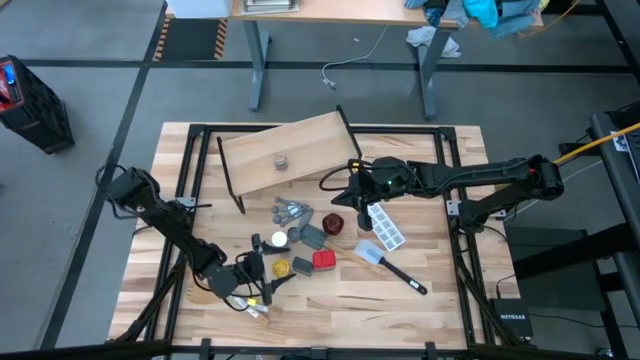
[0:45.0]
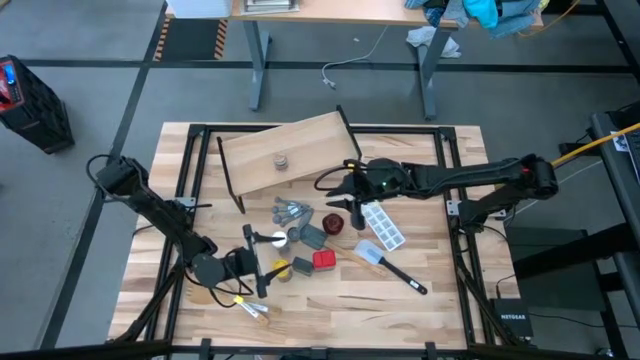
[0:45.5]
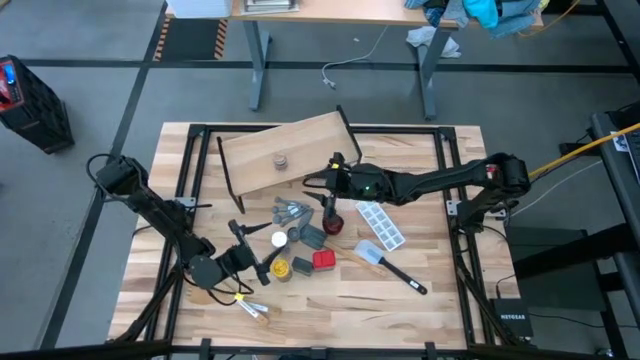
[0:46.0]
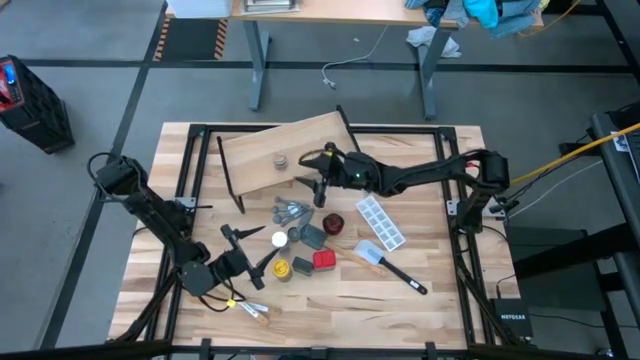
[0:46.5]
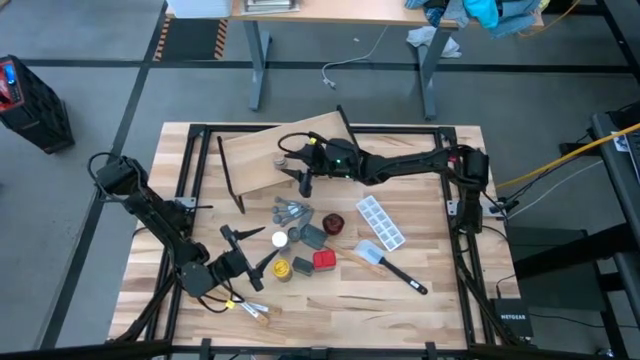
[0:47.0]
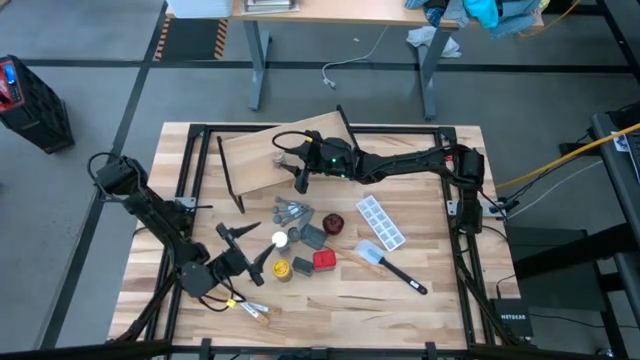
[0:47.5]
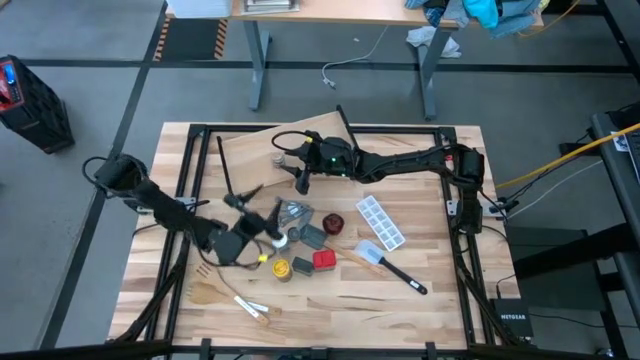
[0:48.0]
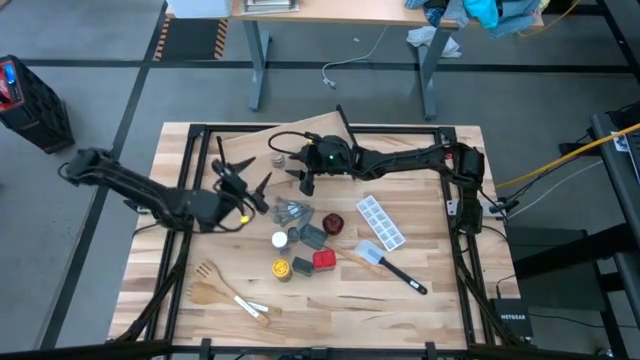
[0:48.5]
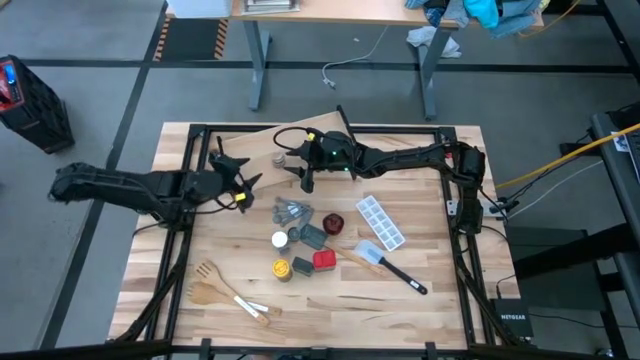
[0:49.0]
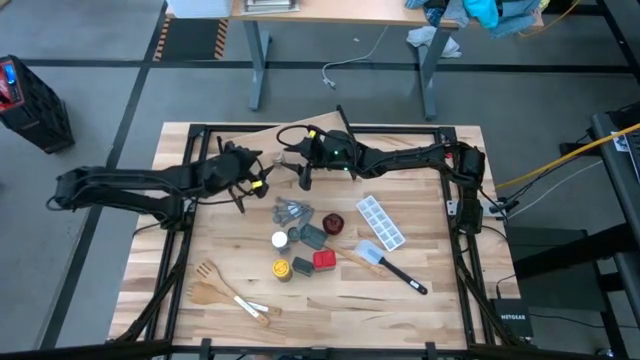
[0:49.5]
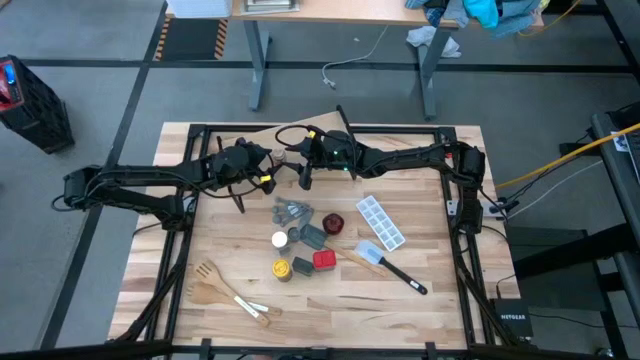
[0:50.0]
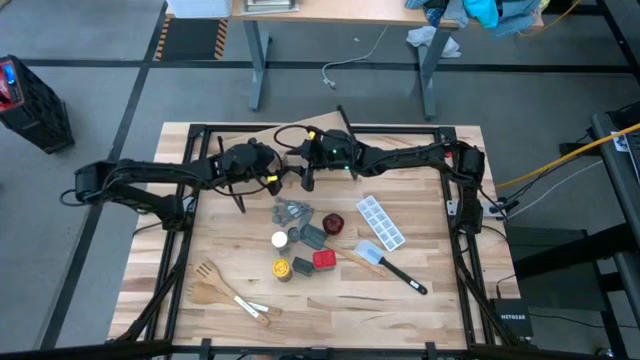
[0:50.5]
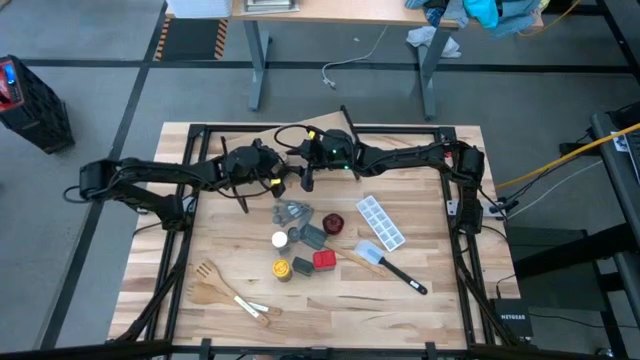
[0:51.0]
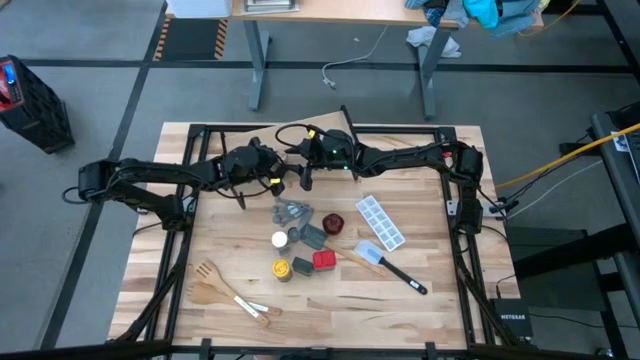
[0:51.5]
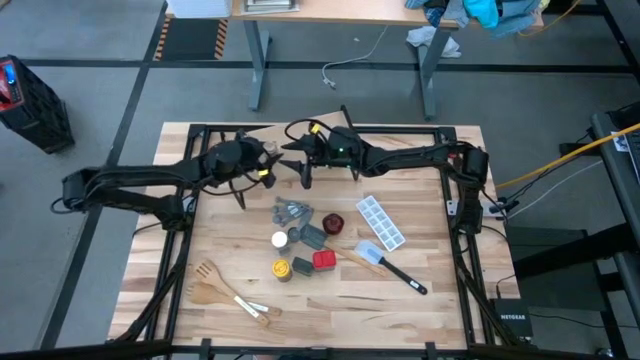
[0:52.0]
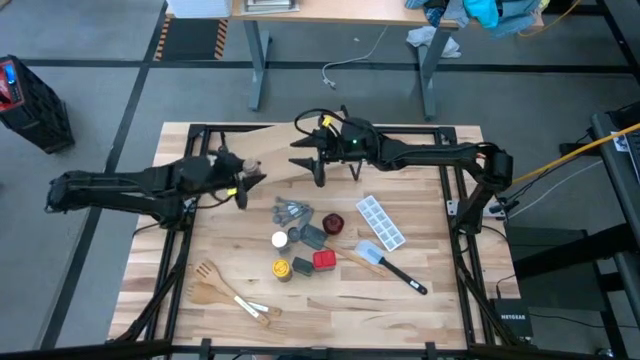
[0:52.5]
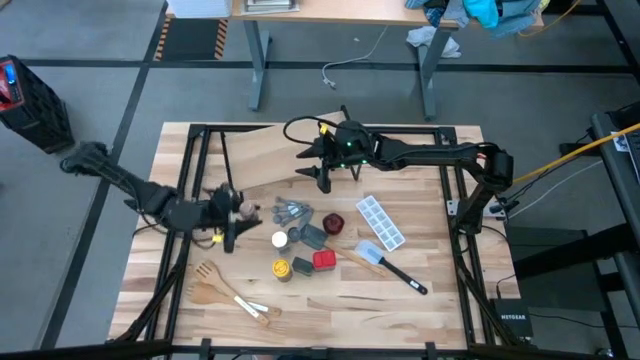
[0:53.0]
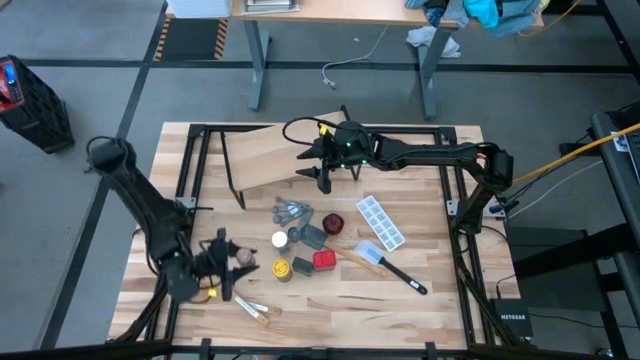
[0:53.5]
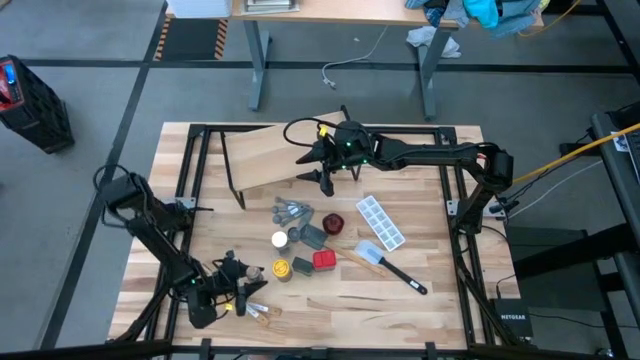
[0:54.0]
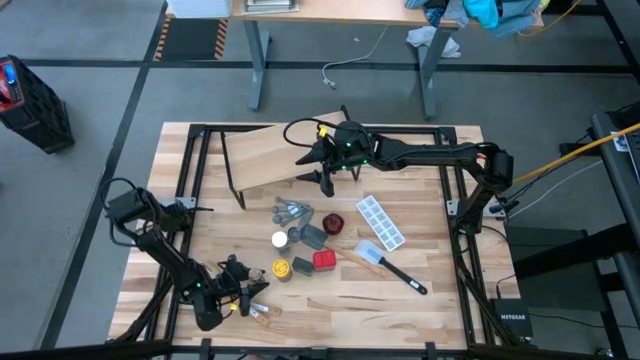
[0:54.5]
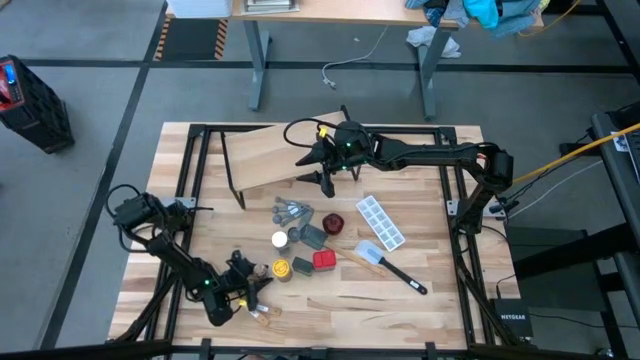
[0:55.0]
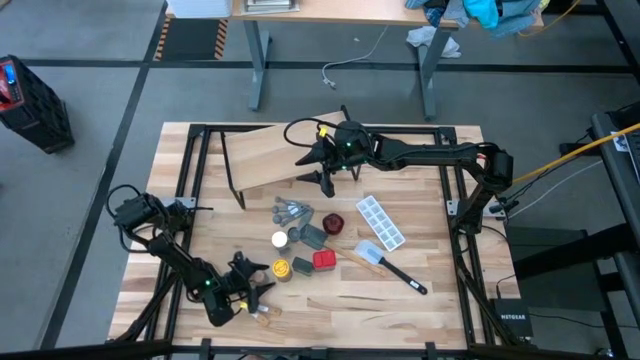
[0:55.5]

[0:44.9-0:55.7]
Task: Shelf spices
Remove the brown seasoning bottle from the shelf

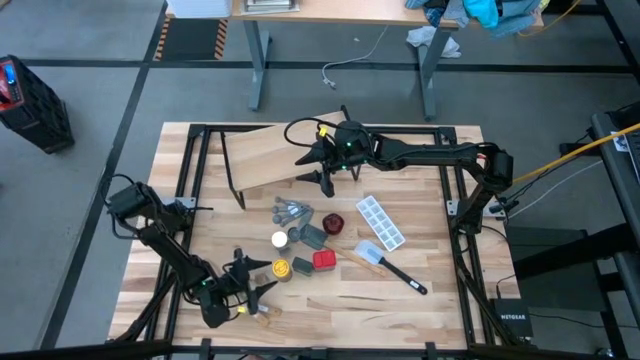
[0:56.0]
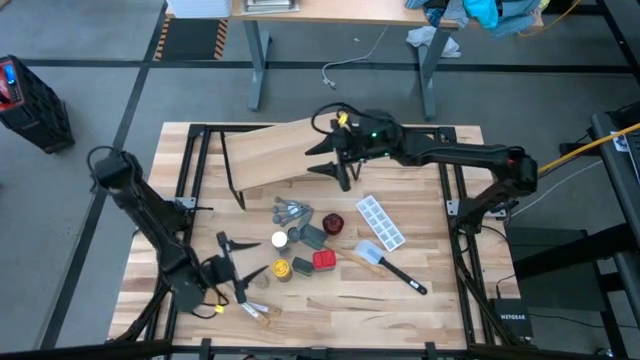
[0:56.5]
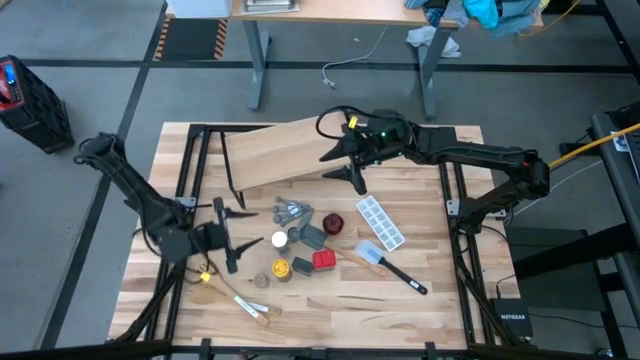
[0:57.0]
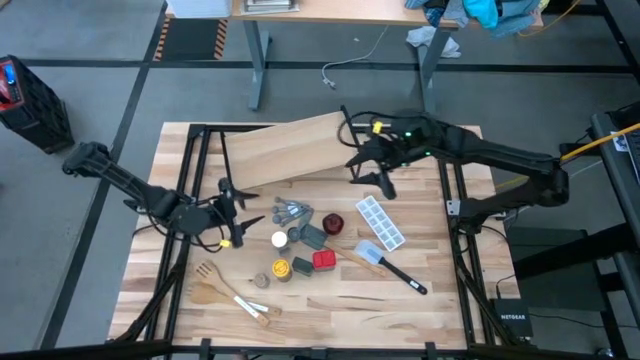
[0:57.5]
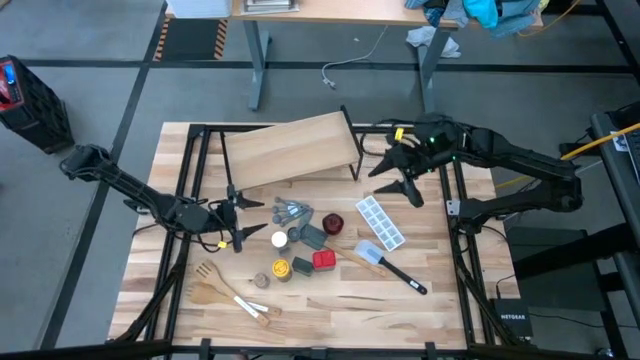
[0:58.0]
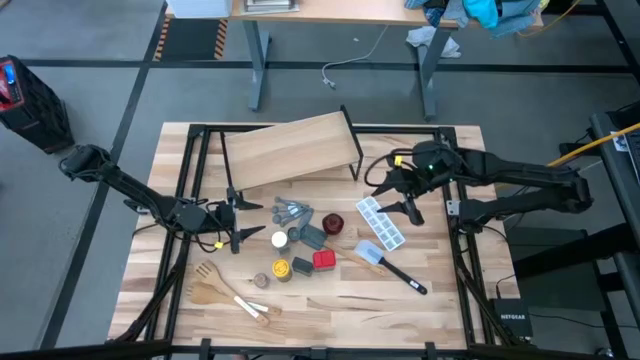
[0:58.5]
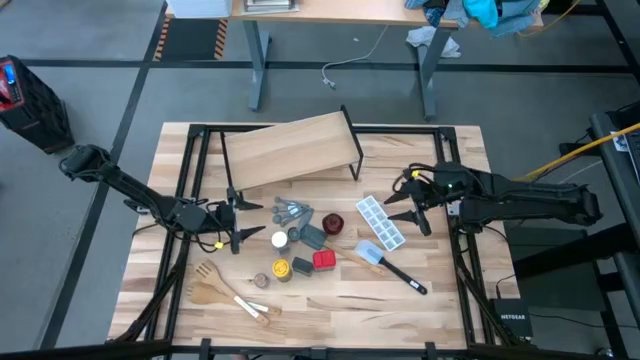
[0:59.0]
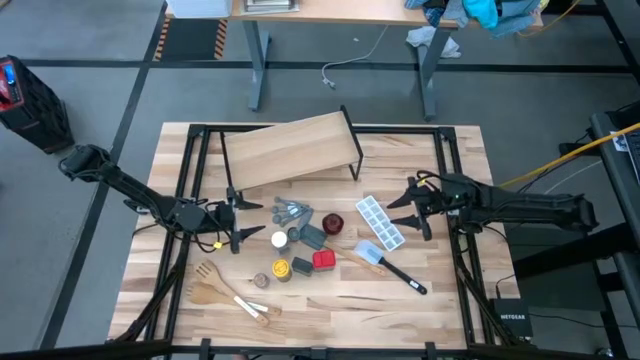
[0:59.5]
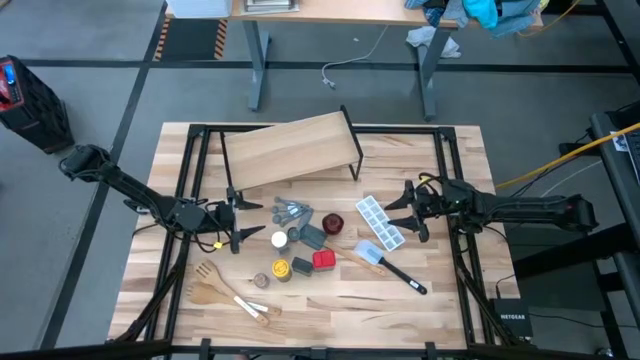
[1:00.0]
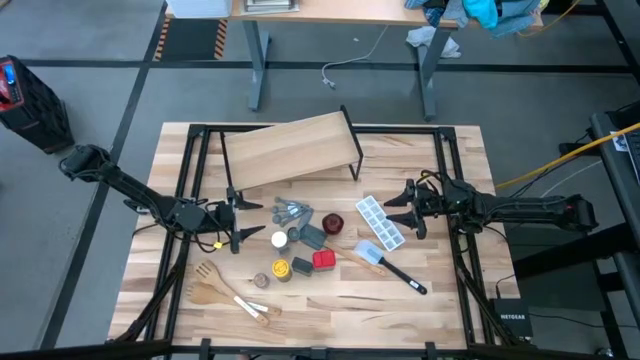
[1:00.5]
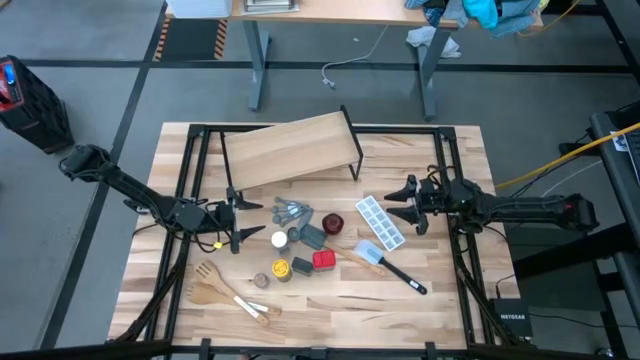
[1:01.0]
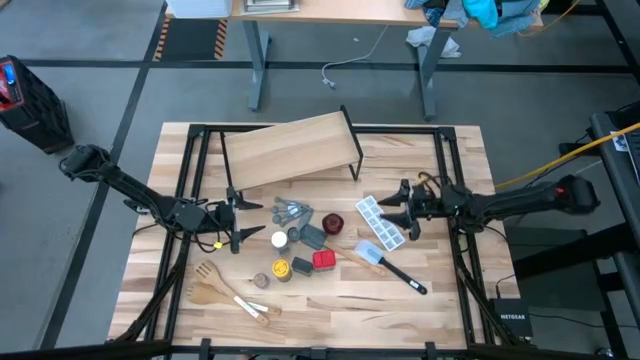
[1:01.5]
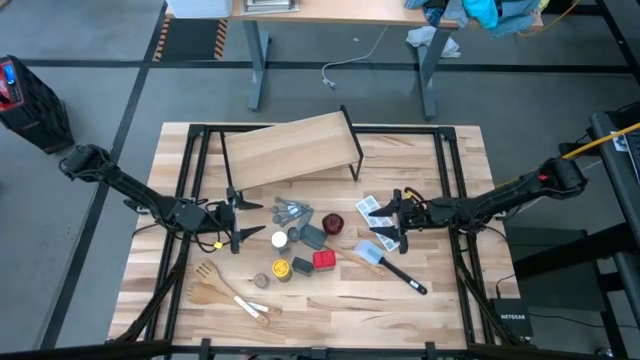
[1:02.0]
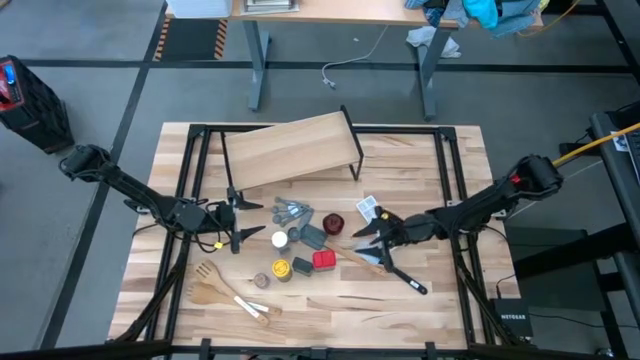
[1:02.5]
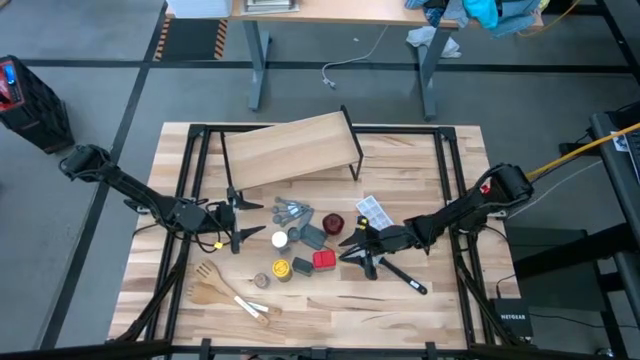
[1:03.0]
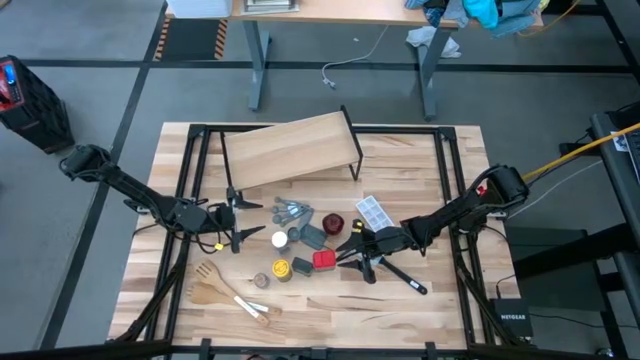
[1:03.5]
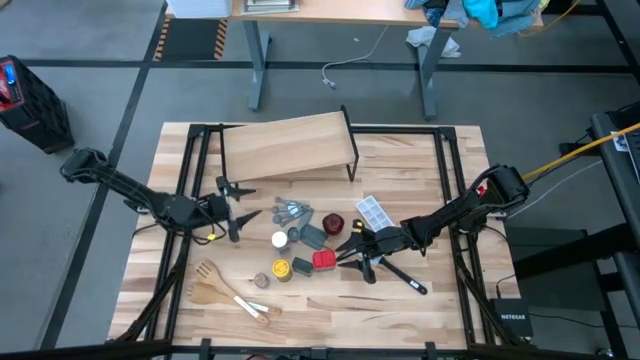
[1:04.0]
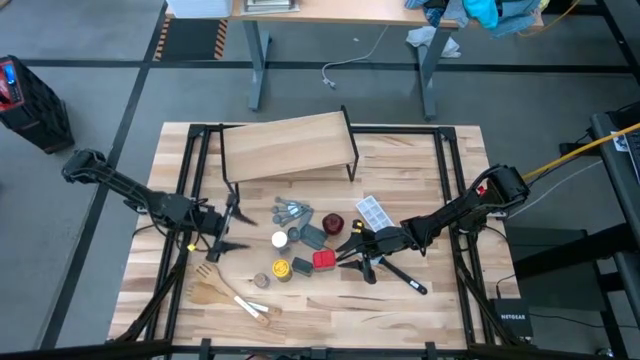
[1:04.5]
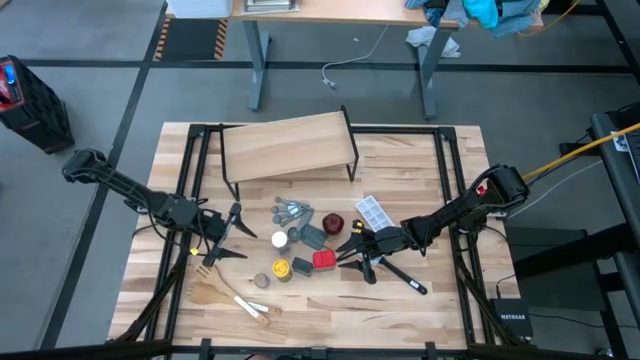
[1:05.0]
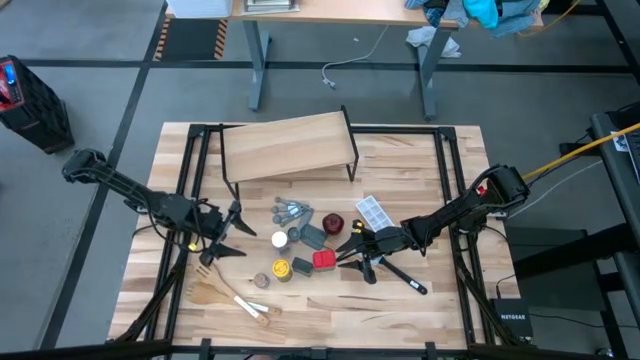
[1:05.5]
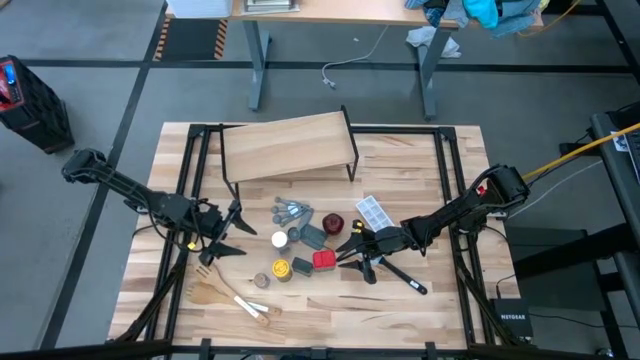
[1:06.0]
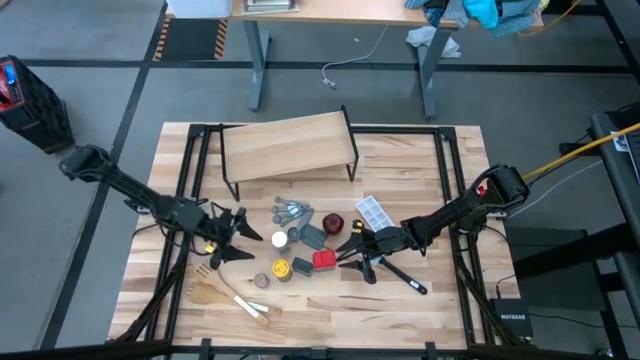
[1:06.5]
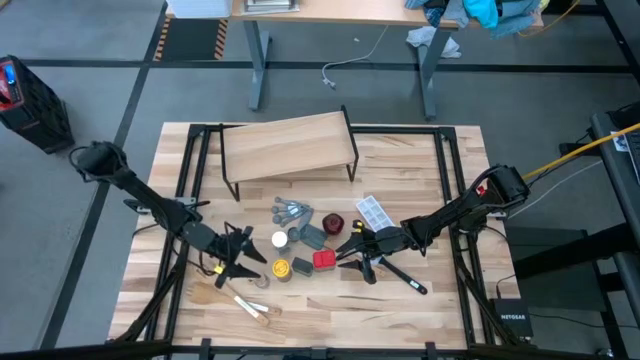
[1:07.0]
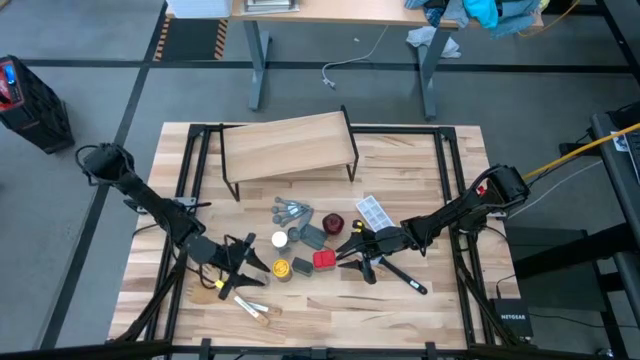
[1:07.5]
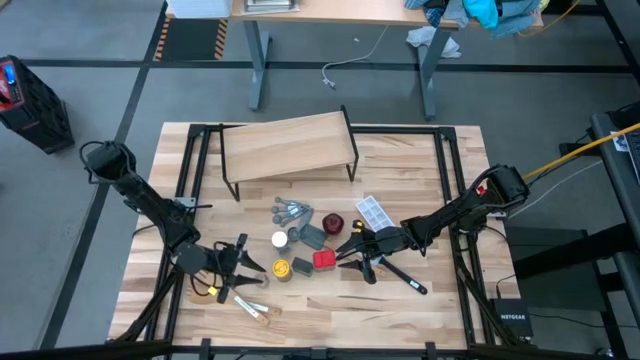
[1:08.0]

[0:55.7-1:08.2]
Put the yellow seasoning bottle on the shelf
